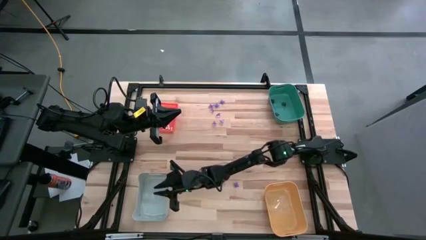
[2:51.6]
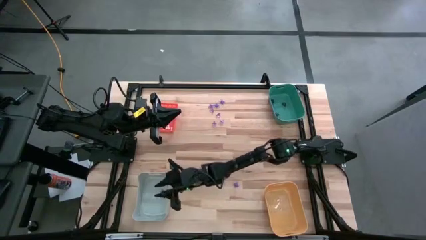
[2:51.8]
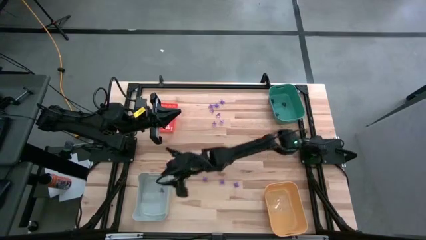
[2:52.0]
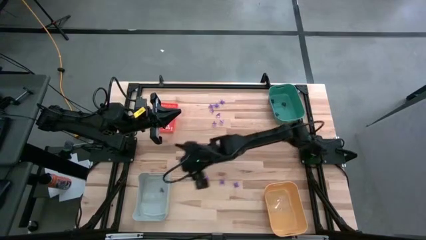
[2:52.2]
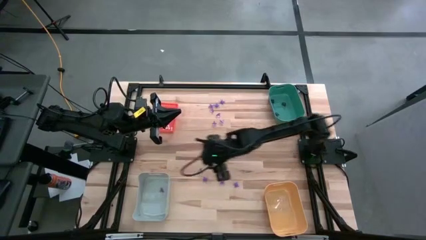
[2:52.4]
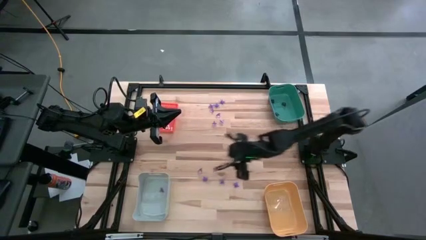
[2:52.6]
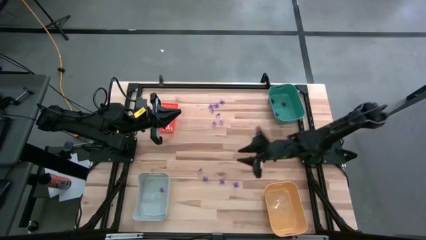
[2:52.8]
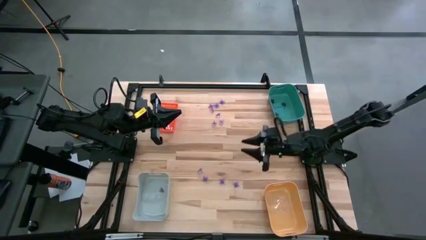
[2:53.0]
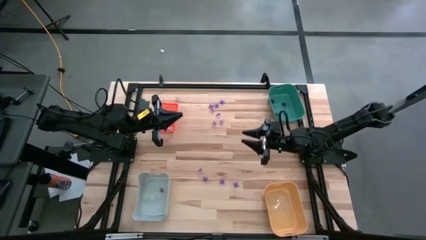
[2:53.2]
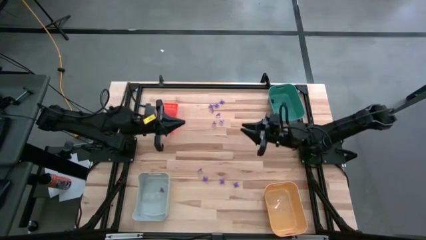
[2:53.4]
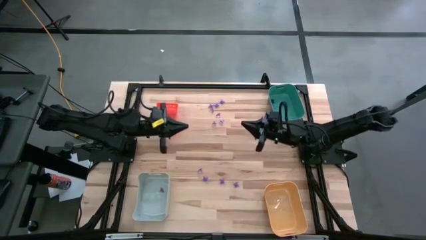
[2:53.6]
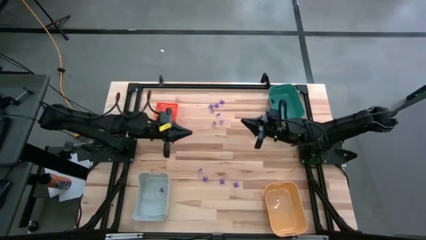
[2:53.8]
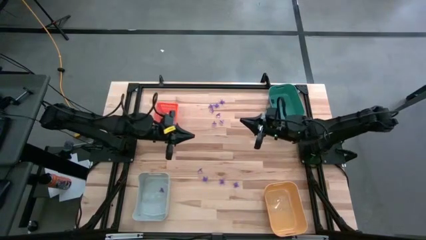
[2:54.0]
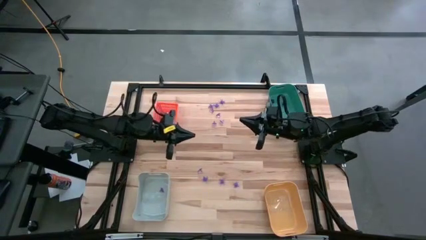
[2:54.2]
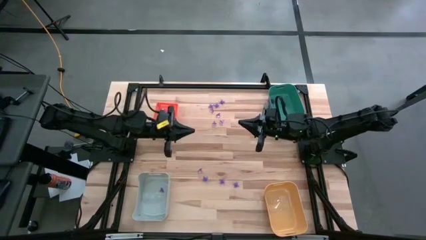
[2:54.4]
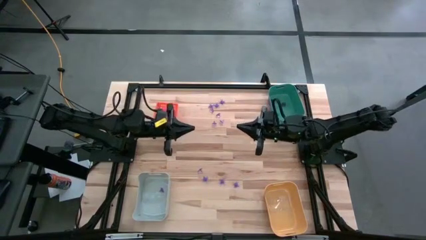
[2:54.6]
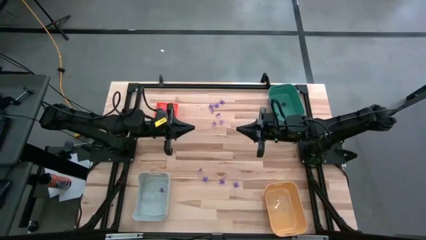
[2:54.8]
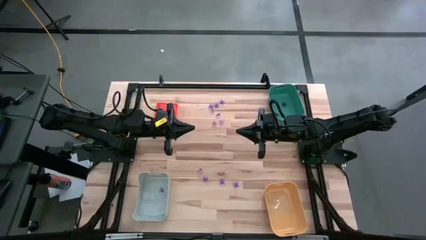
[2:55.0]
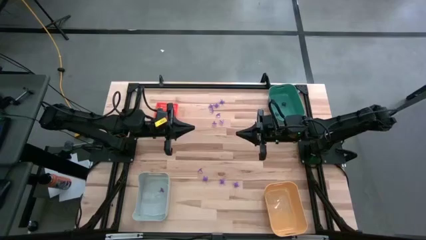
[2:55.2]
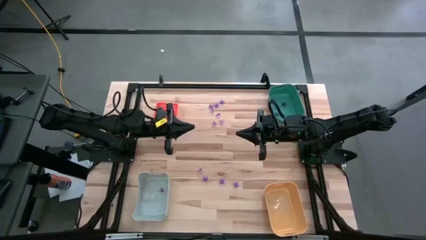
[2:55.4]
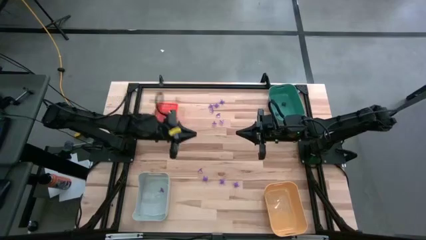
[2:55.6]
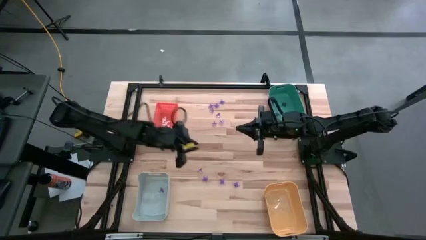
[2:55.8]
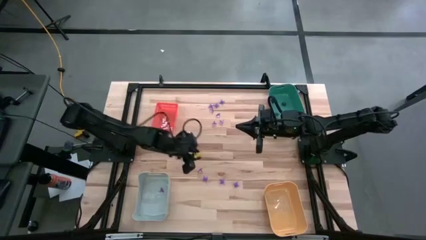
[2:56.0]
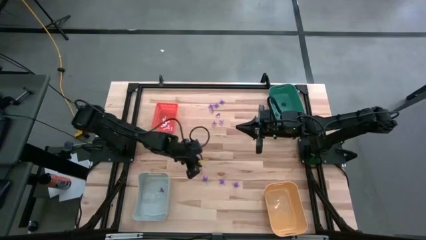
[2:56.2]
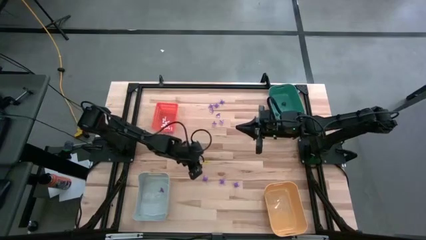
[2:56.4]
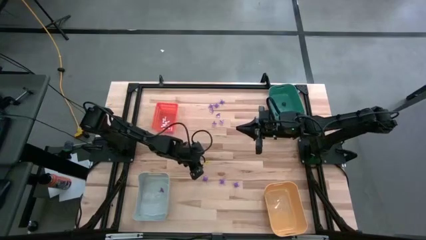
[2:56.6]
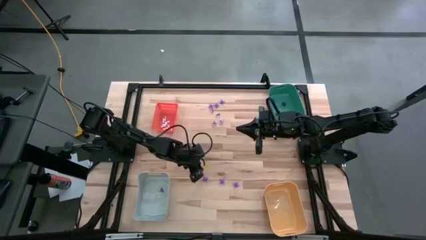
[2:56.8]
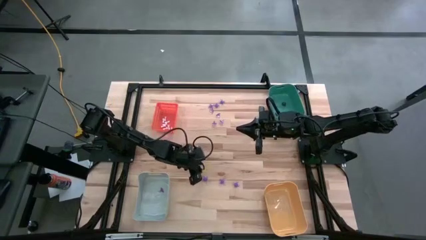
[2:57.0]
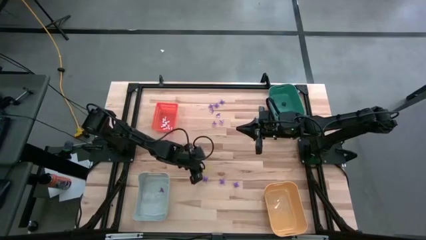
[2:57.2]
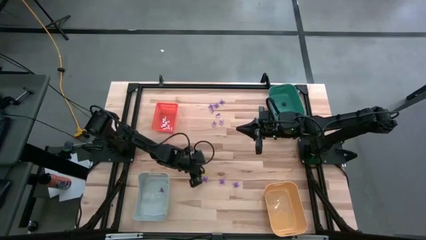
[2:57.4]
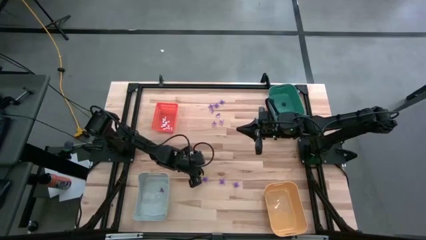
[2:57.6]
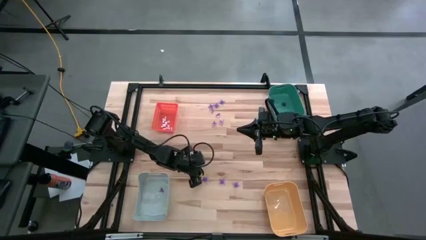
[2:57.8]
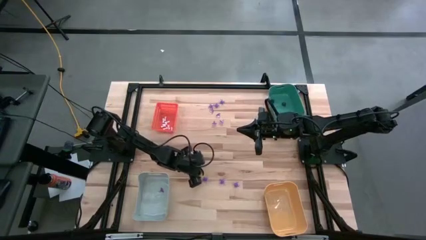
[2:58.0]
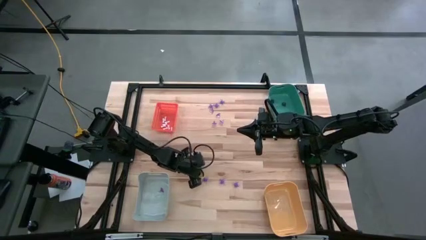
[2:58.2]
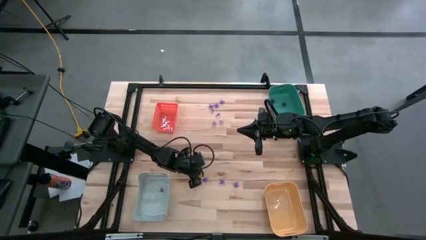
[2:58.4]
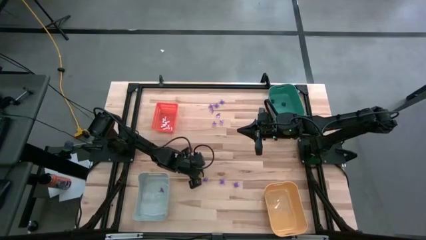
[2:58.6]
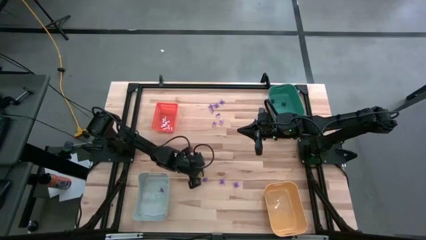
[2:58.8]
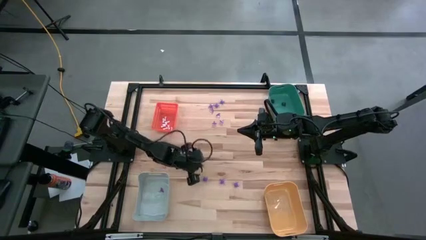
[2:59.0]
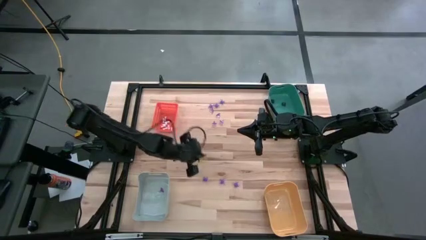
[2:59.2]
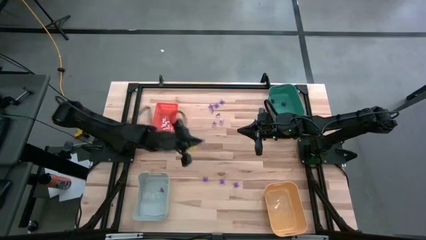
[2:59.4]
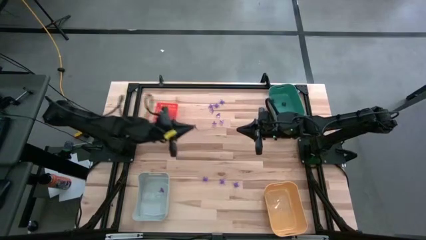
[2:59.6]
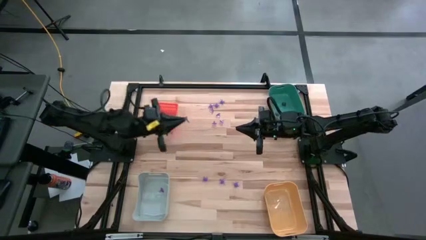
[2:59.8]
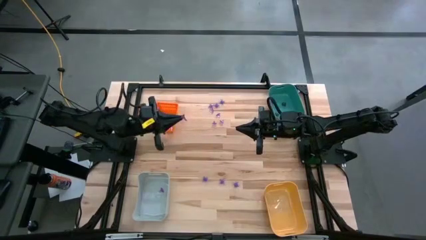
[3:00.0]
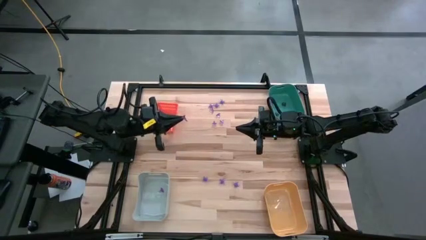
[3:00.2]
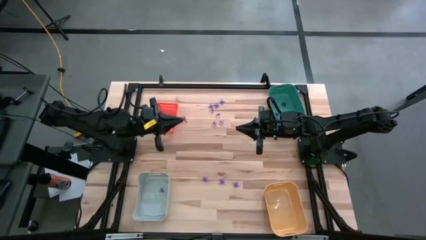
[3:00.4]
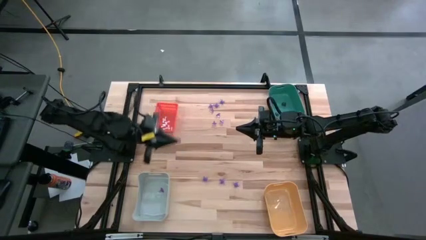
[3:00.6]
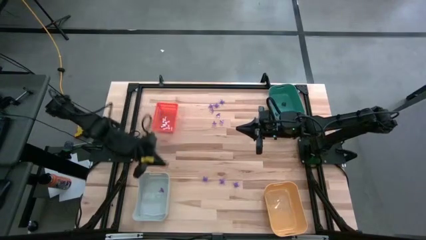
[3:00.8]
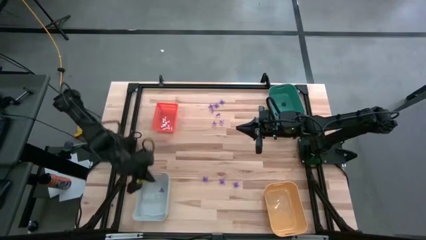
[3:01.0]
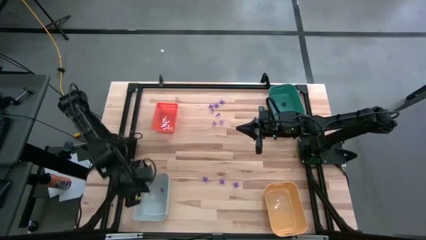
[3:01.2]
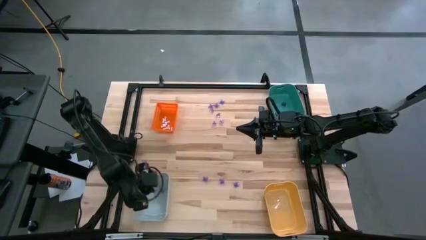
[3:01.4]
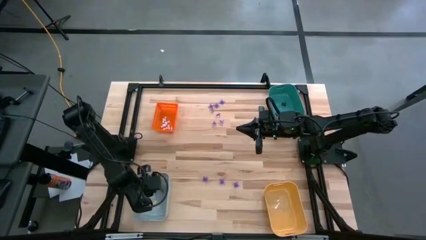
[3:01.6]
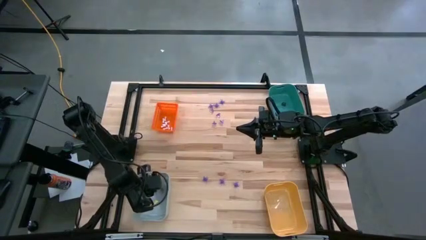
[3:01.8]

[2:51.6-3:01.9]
Task: Sort Halloween decoration
Put the violet hat toy into the gray bin

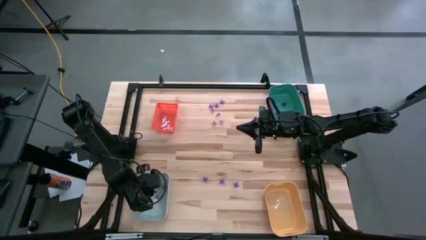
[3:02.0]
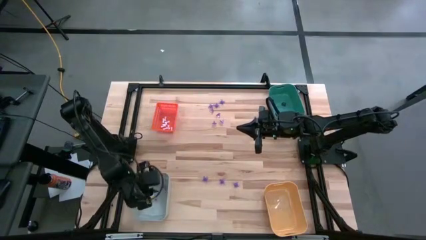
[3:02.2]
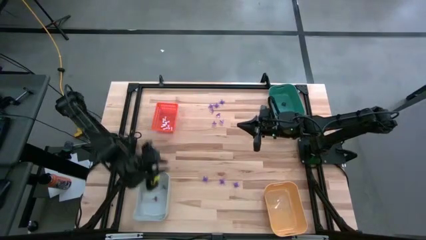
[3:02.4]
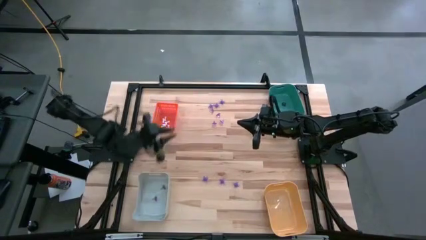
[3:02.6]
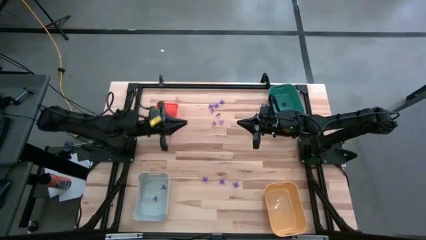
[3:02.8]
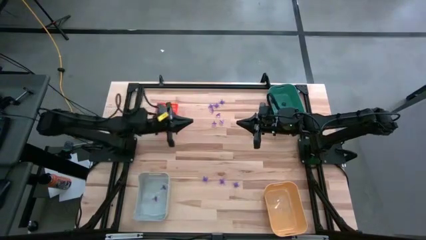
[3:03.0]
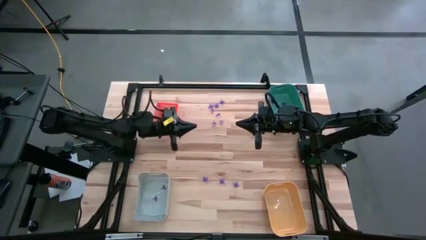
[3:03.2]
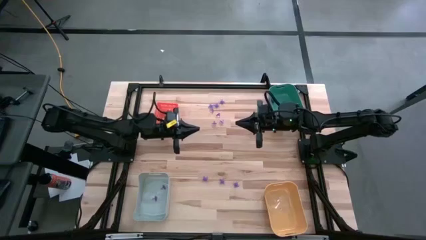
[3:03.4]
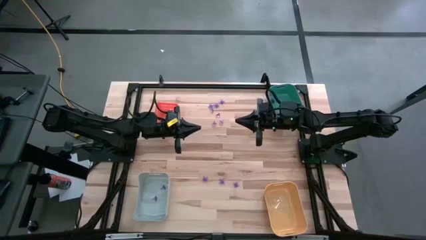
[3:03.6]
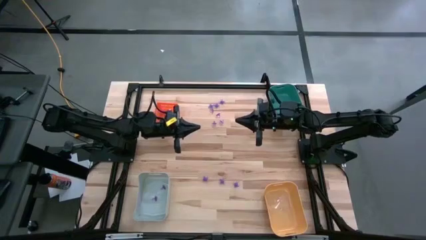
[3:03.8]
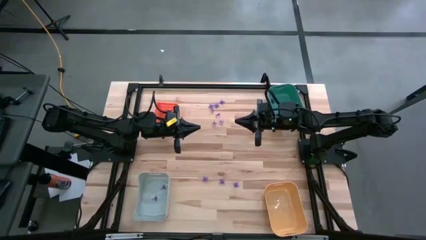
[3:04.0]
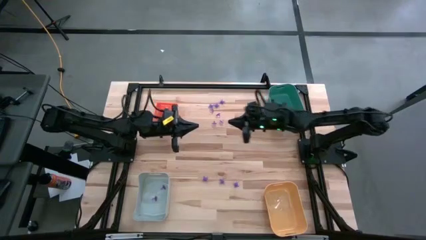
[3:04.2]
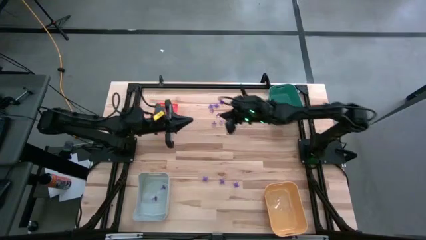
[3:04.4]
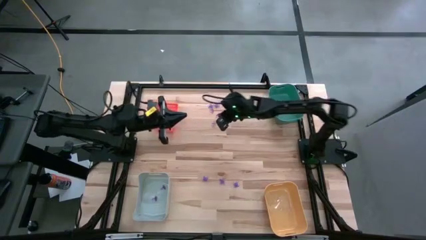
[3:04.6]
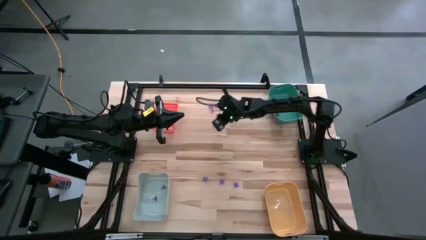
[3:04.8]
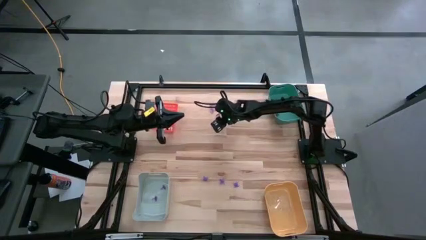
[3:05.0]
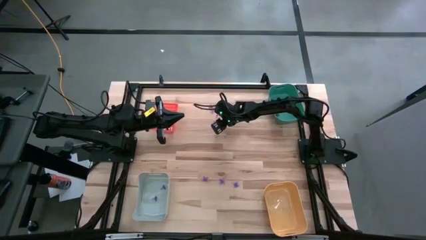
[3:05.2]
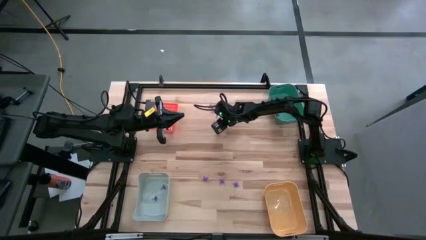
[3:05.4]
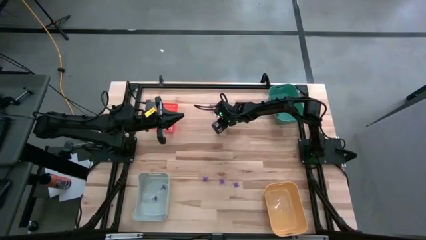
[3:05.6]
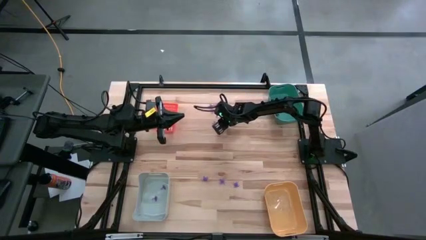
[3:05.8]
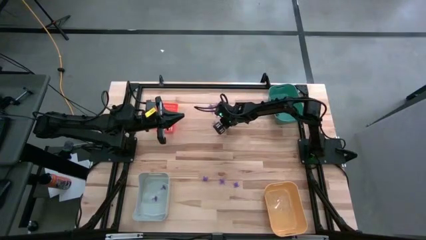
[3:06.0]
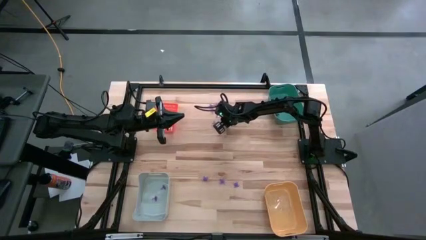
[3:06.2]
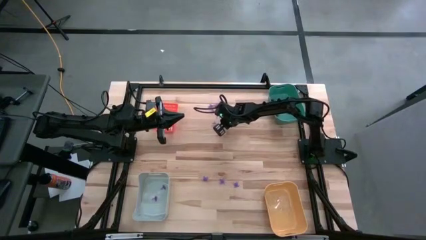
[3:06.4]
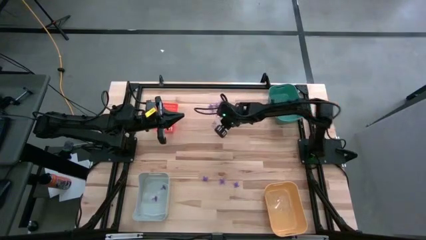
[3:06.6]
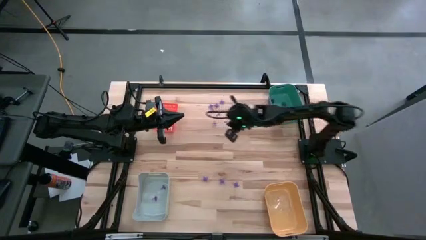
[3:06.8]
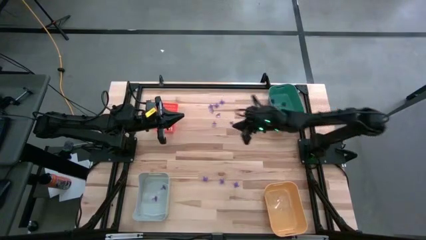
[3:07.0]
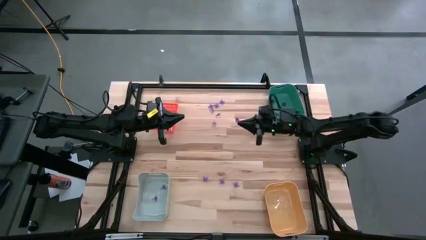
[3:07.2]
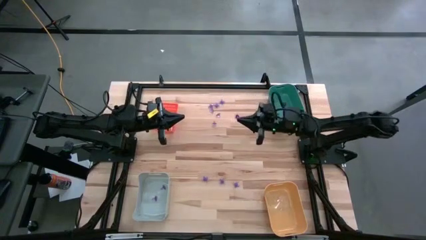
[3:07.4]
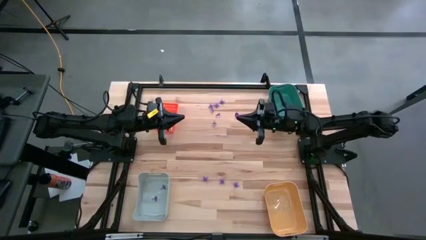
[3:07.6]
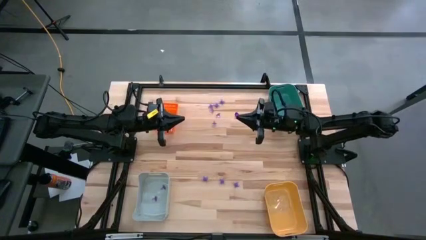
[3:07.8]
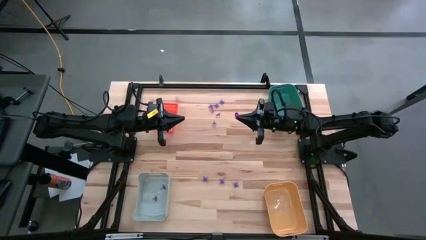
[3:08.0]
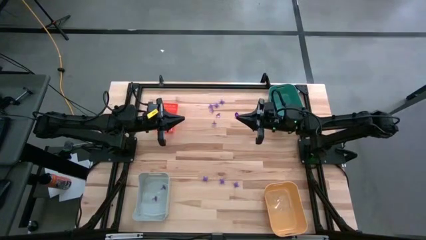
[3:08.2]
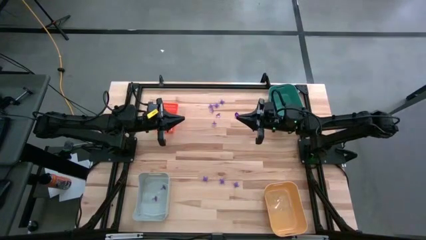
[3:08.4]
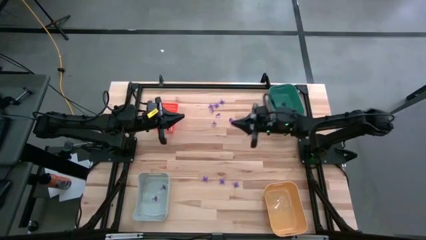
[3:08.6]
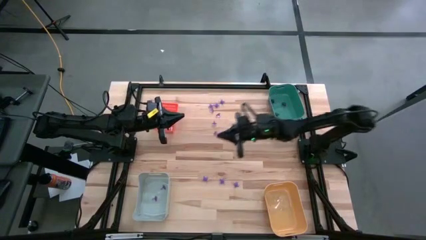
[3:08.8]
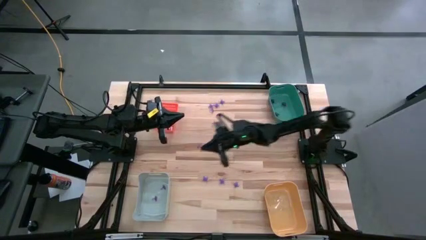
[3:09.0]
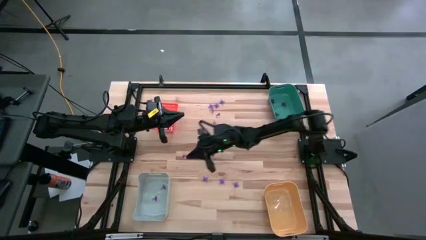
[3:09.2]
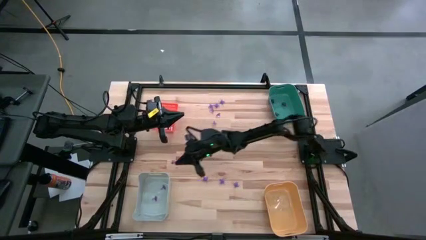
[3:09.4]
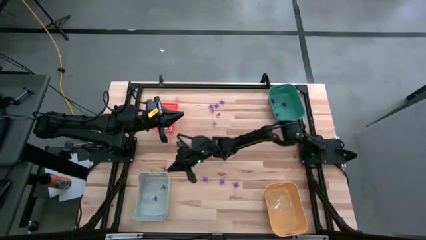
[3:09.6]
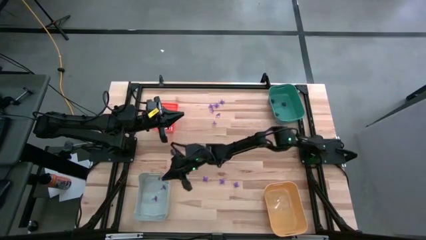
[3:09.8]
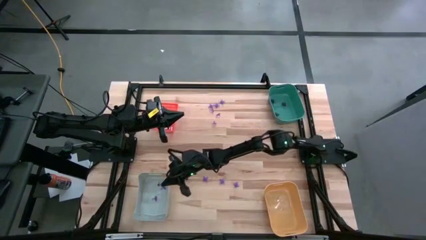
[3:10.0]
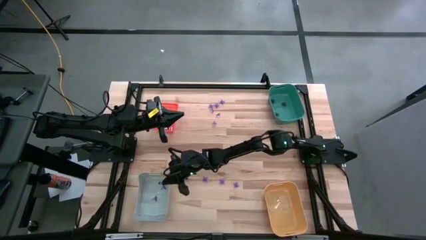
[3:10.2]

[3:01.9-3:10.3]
Put the violet hat toy into the gray bin
